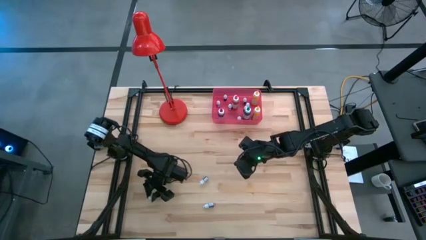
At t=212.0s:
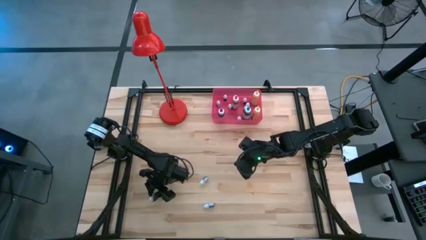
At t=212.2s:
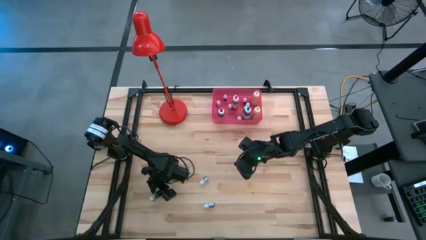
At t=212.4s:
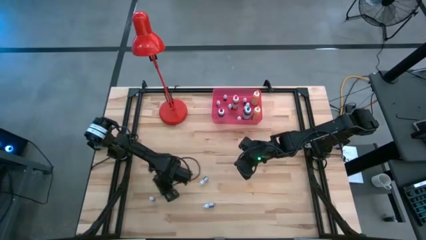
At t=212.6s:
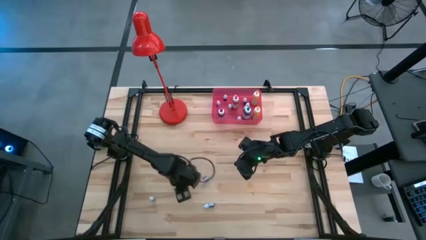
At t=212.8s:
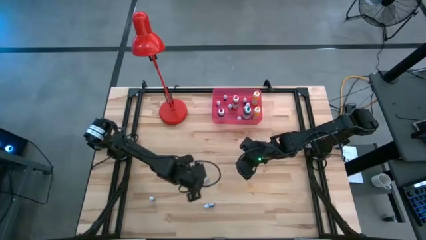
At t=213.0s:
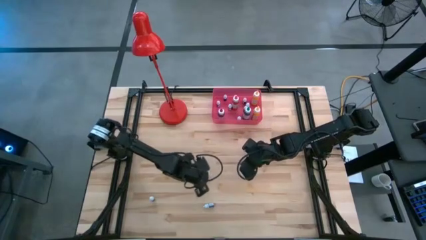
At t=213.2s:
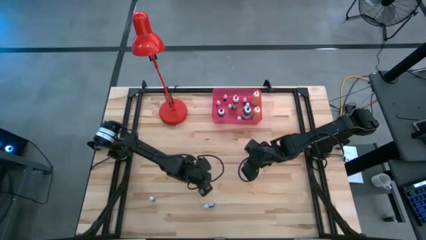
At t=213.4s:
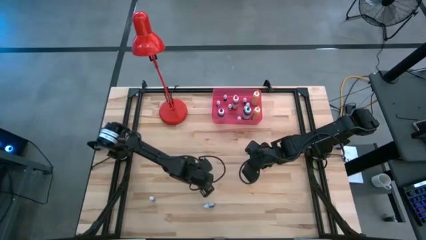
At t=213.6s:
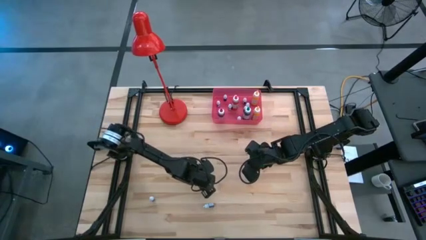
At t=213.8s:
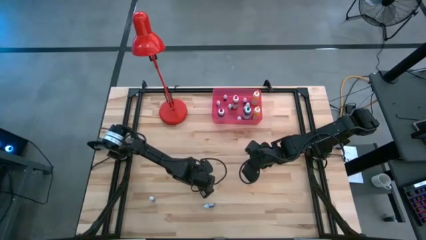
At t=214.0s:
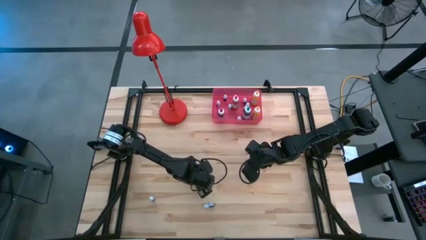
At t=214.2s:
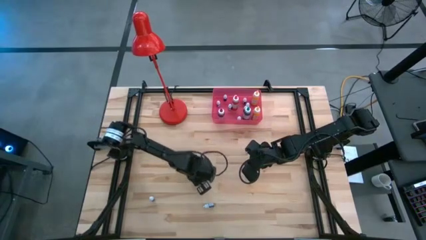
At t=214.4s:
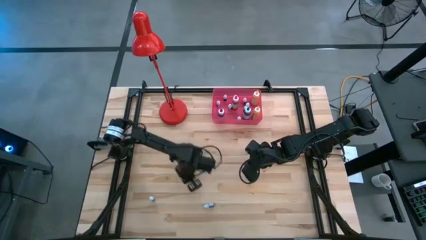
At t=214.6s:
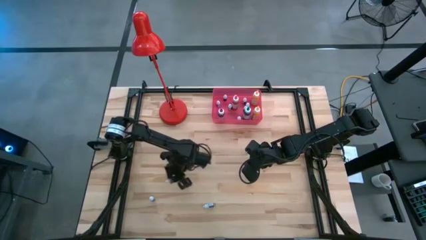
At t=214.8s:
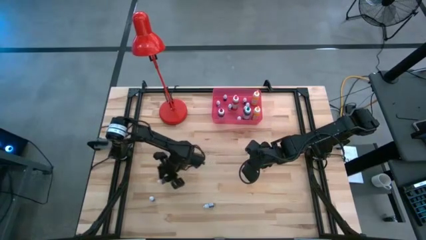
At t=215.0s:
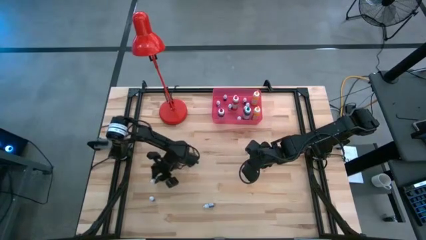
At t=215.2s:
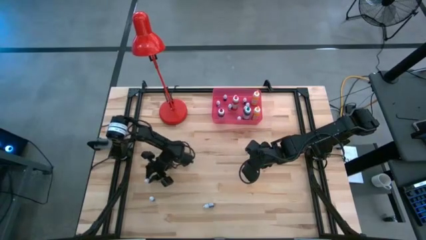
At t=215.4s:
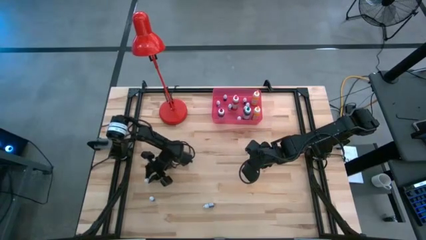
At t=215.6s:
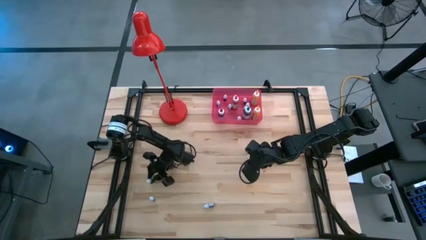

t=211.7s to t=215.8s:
Task: Pick & Place food coloring
Adjust the small black food coloring bottle

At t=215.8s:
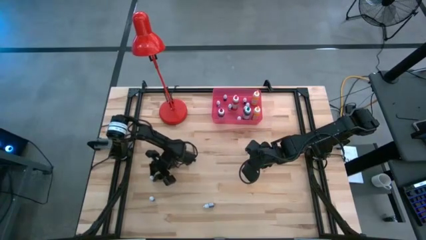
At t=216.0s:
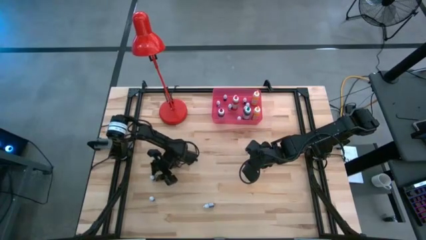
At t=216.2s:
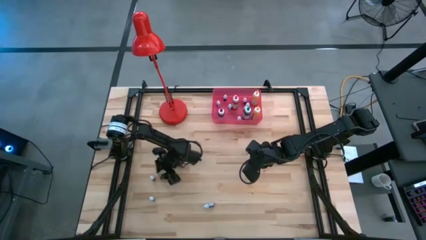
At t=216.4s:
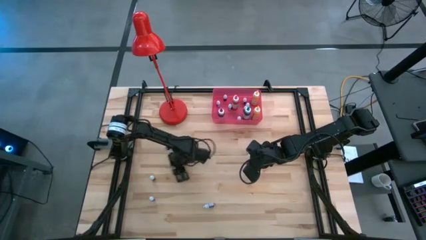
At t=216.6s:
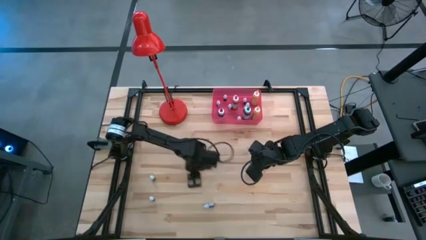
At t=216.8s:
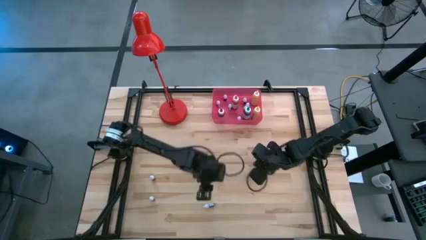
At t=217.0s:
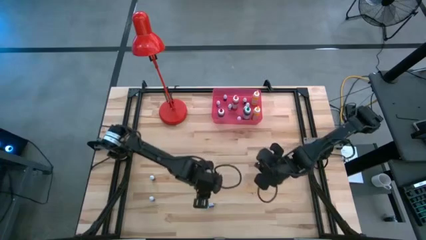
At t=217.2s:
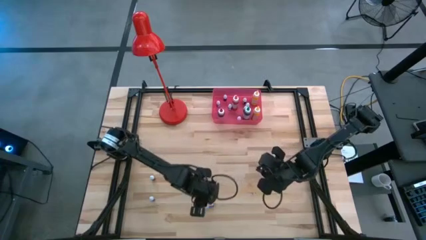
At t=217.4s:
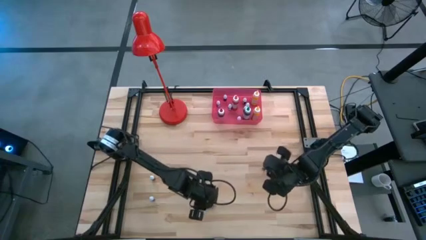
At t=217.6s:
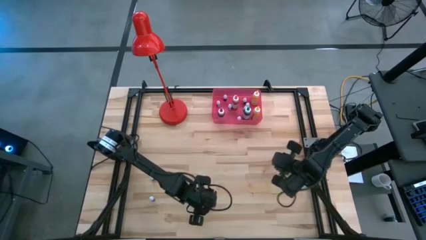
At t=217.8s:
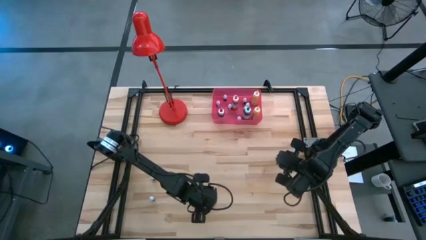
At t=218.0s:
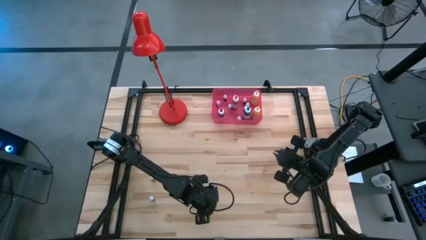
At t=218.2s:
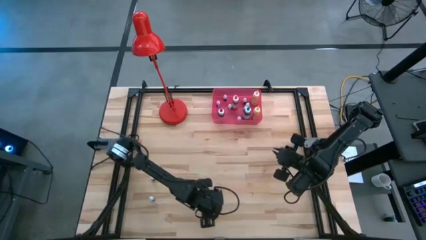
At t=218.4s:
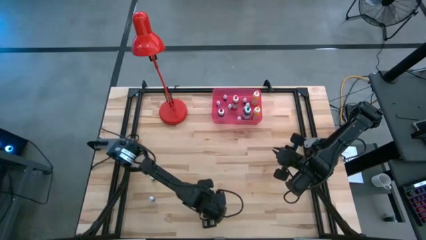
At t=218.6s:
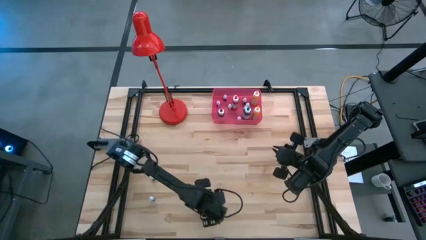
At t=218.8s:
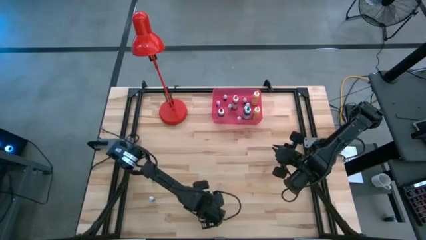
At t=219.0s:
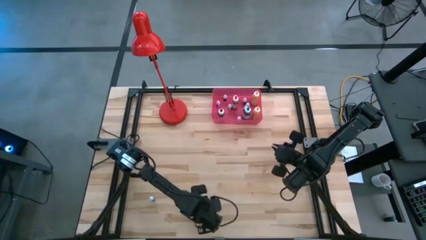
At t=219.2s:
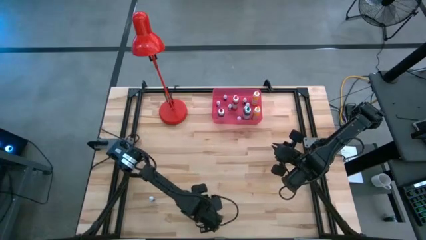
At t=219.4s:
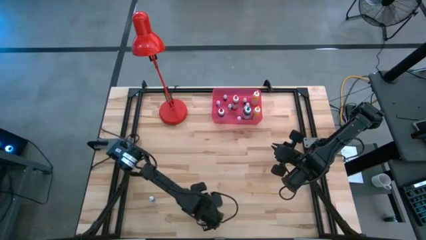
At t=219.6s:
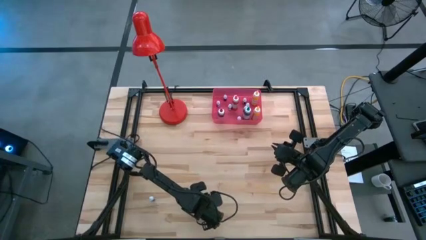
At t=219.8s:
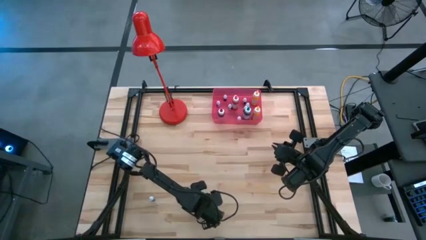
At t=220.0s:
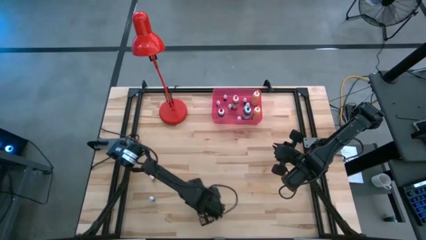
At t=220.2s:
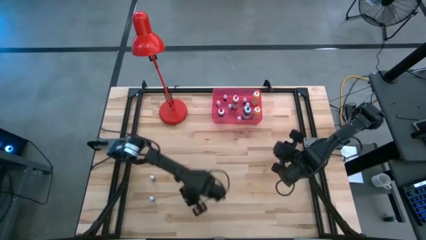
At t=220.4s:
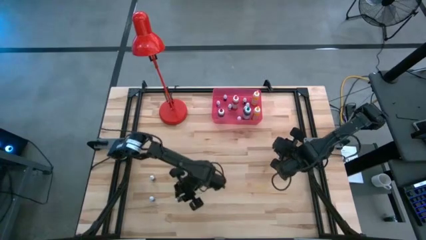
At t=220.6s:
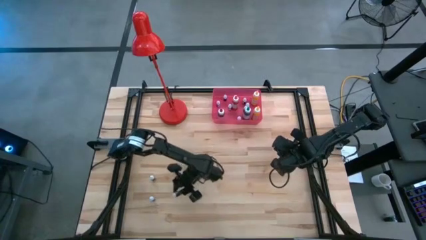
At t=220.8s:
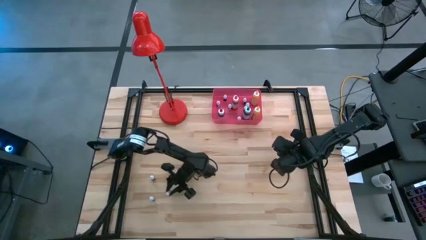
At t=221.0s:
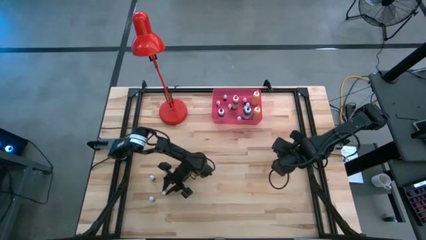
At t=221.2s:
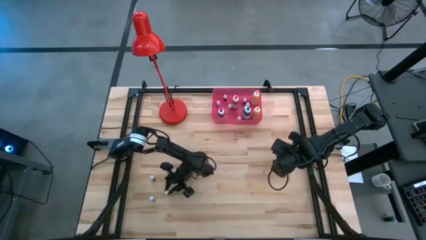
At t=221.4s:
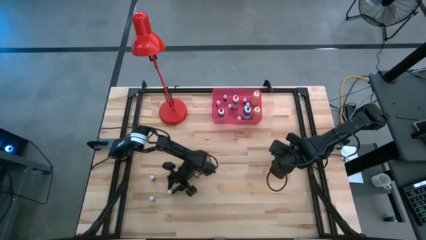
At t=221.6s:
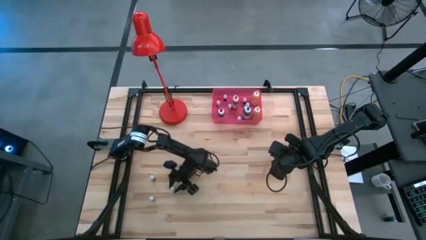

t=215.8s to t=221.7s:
Adjust the small purple food coloring bottle

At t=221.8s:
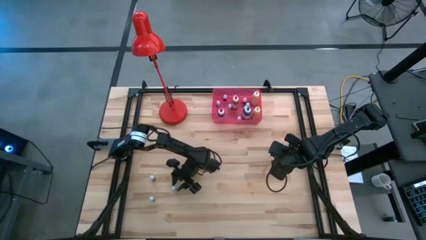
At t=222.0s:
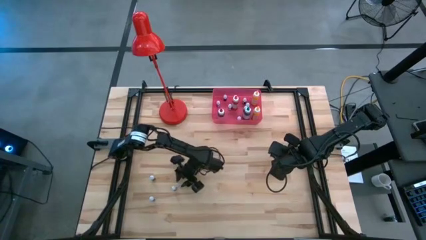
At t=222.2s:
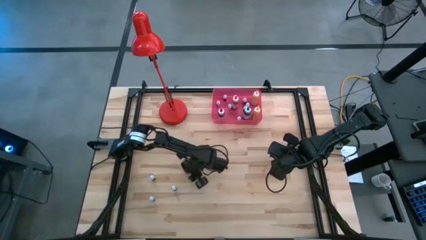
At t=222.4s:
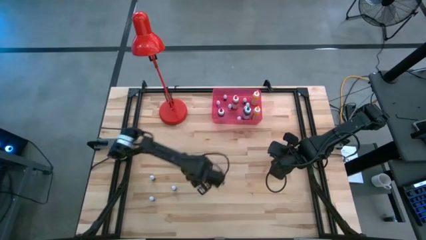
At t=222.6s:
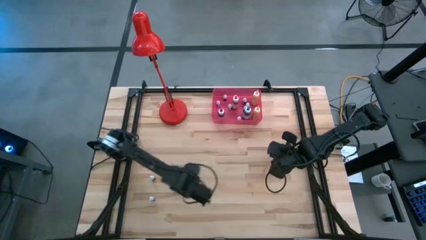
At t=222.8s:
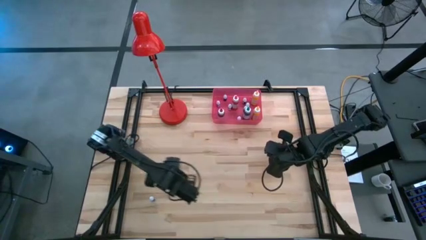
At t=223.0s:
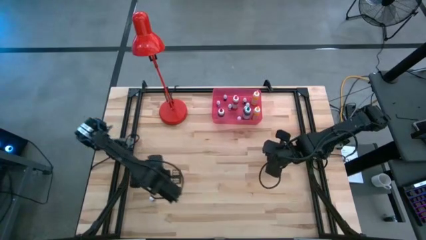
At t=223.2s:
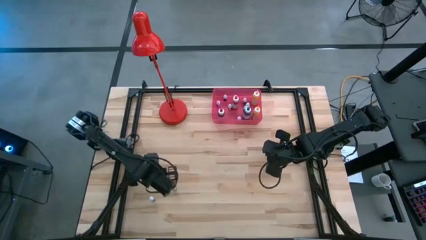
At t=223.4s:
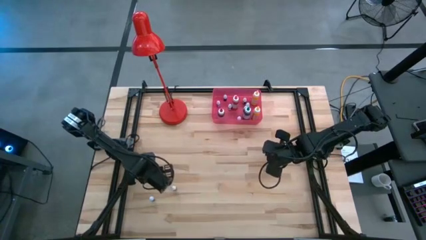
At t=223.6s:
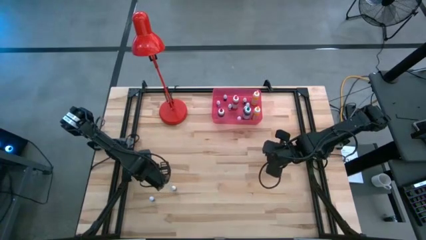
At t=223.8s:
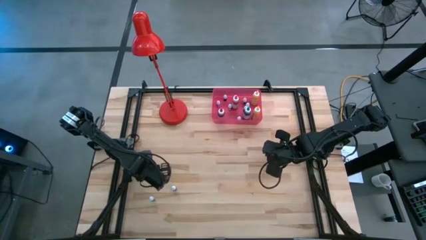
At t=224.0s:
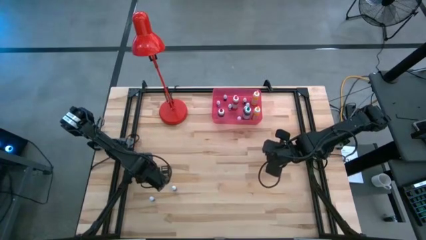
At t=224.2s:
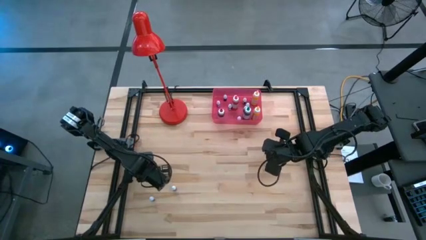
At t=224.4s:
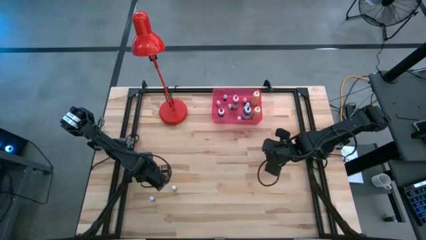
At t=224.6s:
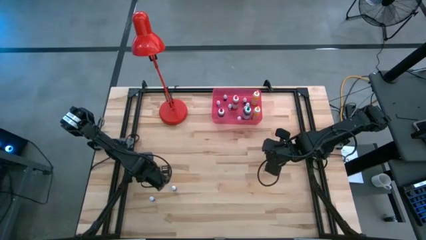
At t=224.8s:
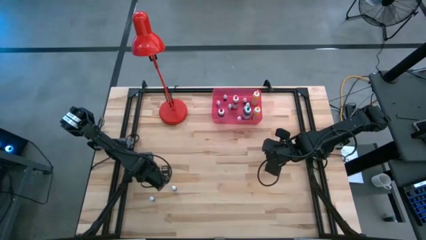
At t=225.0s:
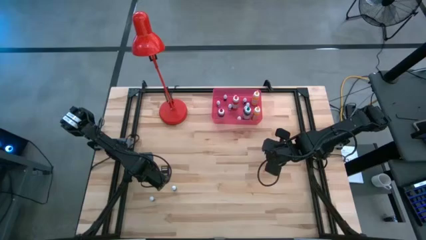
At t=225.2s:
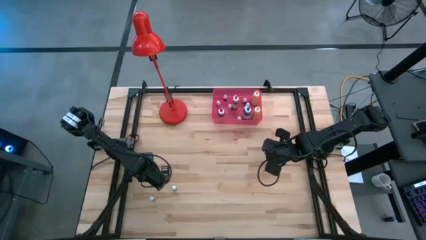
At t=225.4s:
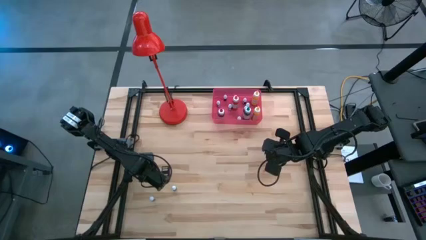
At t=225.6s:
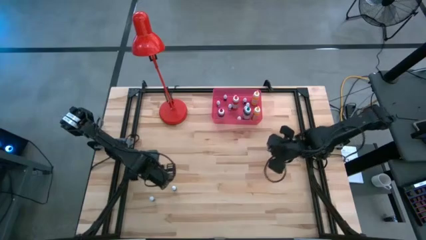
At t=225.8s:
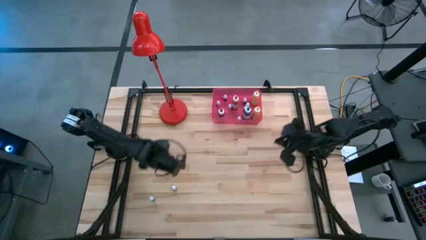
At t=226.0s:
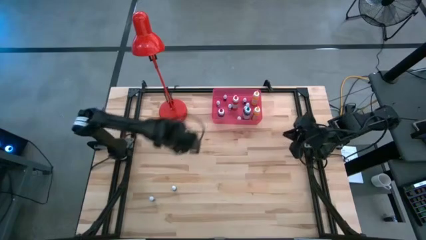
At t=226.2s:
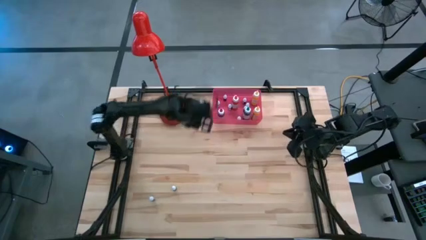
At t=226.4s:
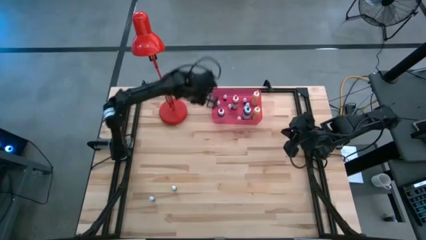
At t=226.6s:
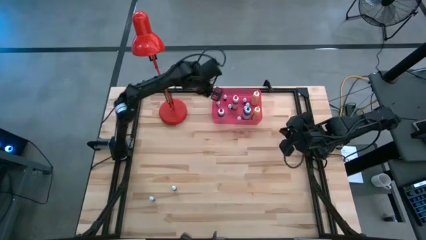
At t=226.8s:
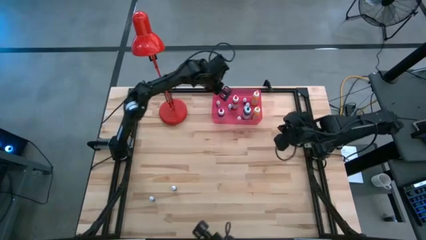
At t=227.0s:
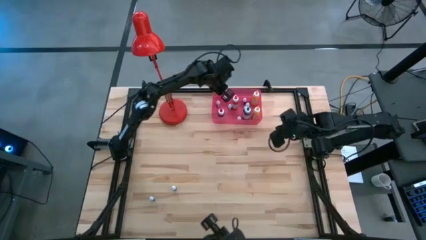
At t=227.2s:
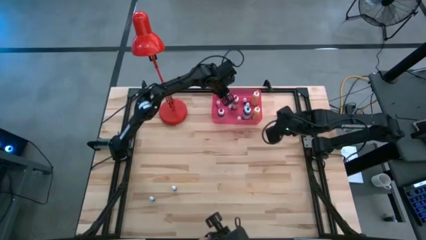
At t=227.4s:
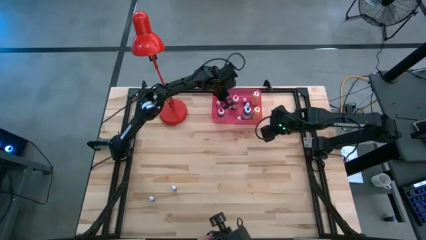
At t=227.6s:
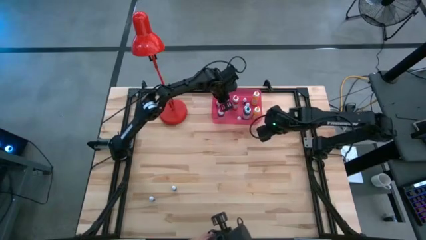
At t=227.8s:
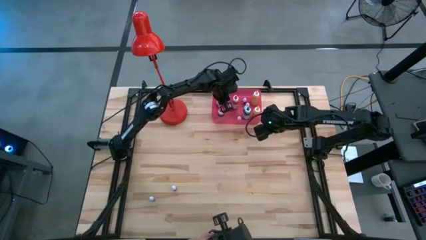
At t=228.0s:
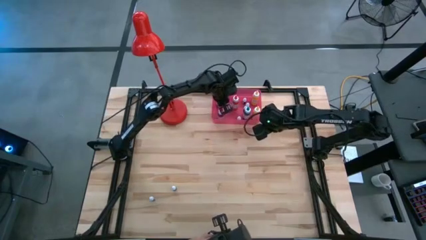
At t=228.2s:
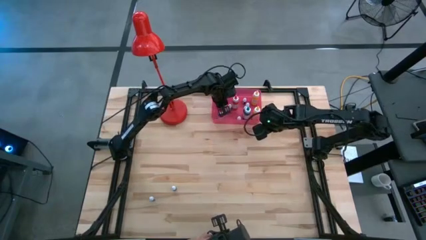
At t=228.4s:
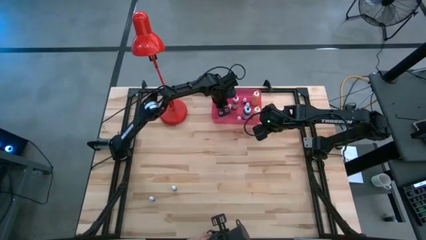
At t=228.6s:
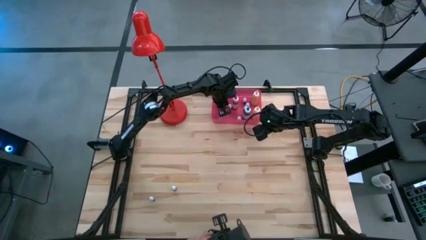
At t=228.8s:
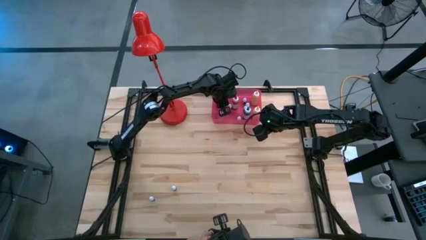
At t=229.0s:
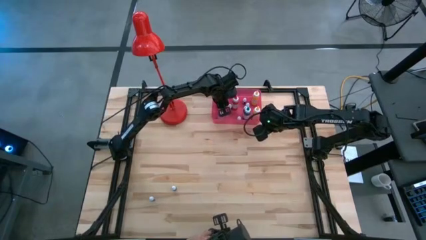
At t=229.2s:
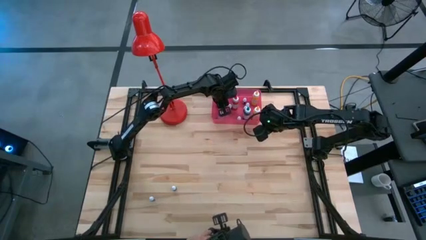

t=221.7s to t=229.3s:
Put the small black food coloring bottle into the red bin
